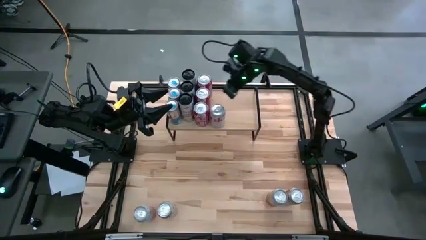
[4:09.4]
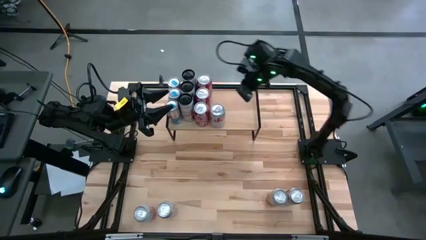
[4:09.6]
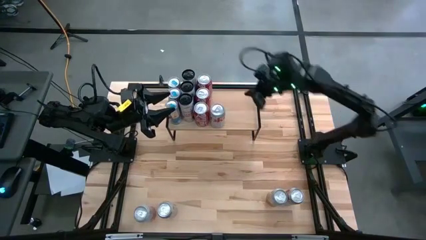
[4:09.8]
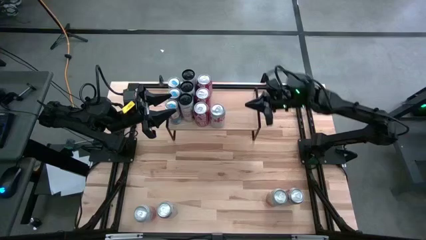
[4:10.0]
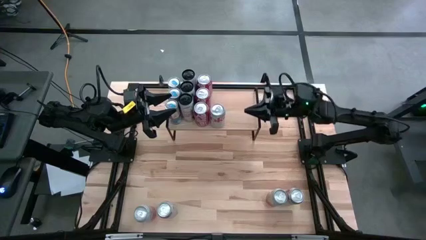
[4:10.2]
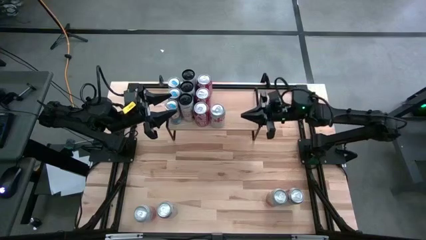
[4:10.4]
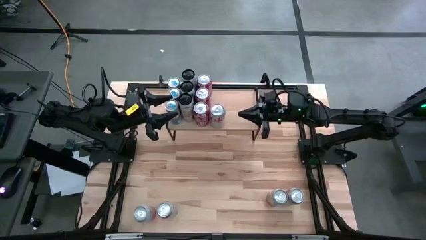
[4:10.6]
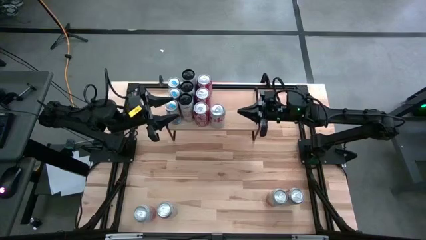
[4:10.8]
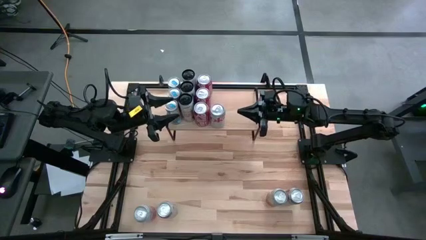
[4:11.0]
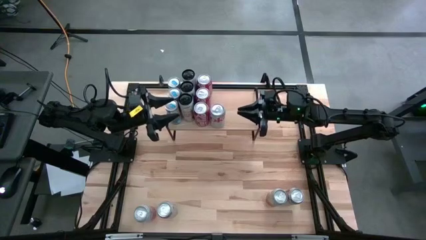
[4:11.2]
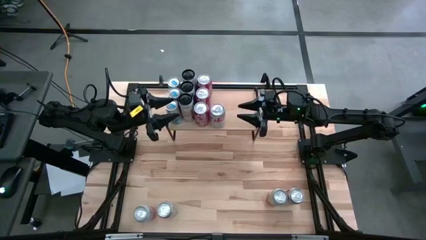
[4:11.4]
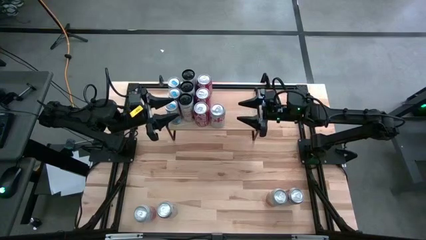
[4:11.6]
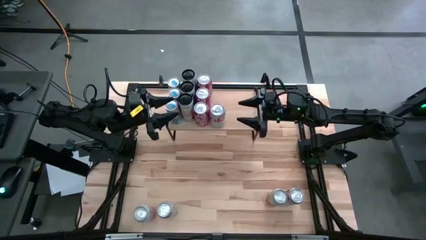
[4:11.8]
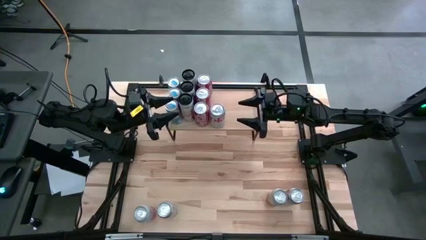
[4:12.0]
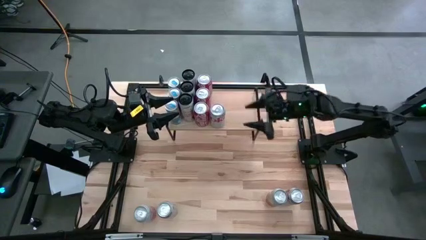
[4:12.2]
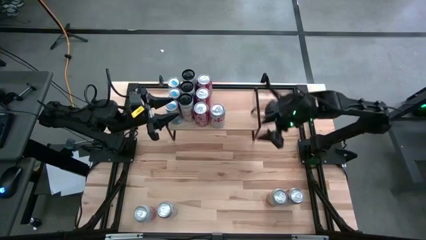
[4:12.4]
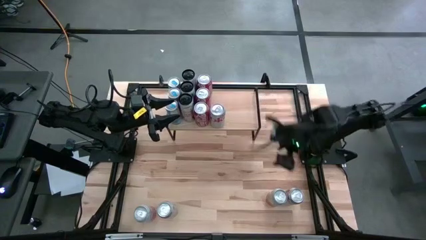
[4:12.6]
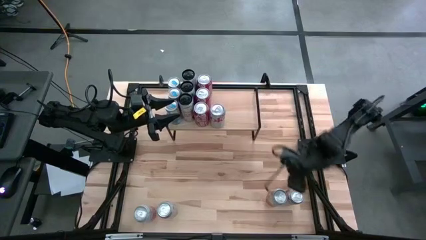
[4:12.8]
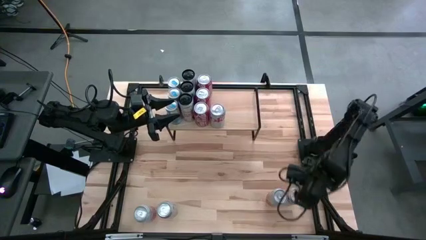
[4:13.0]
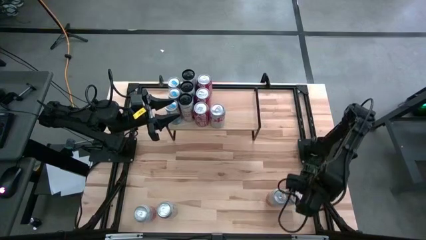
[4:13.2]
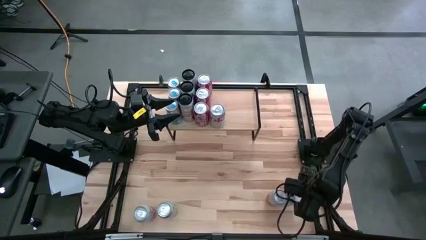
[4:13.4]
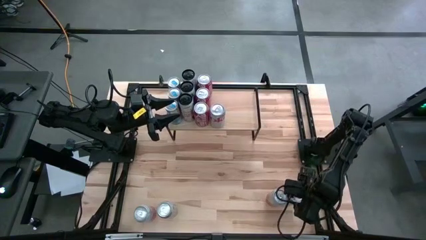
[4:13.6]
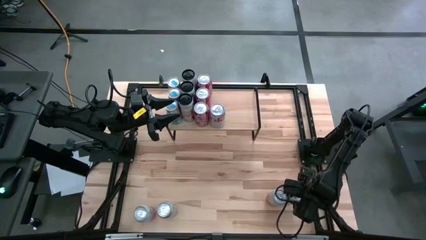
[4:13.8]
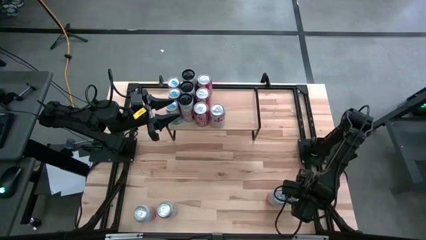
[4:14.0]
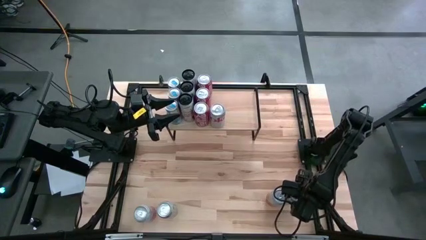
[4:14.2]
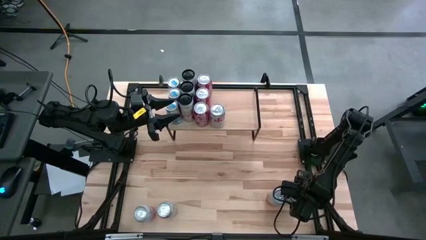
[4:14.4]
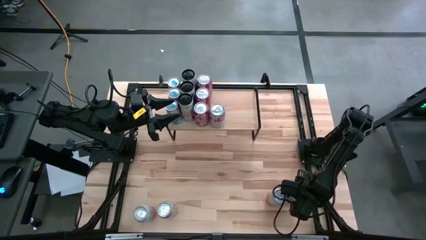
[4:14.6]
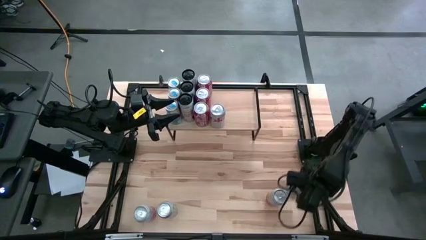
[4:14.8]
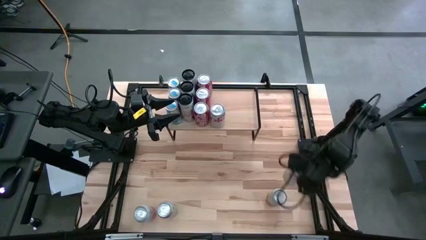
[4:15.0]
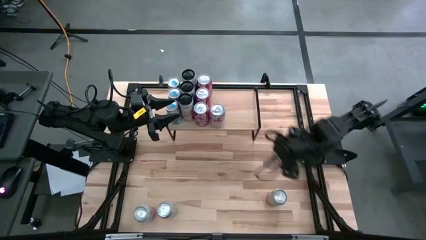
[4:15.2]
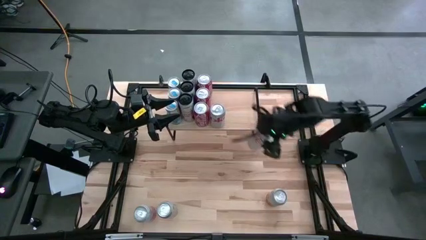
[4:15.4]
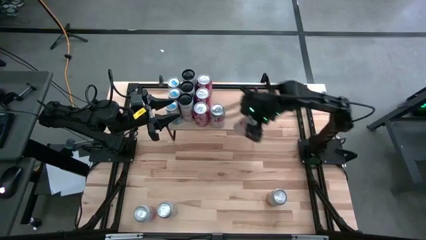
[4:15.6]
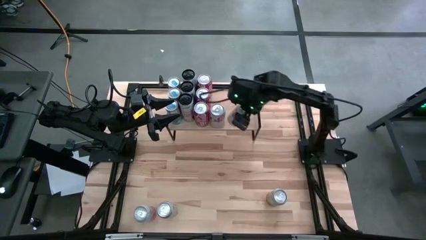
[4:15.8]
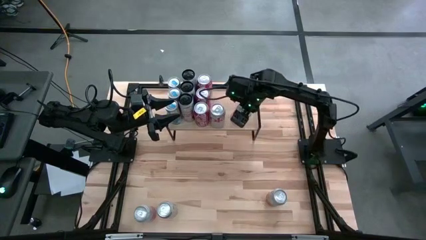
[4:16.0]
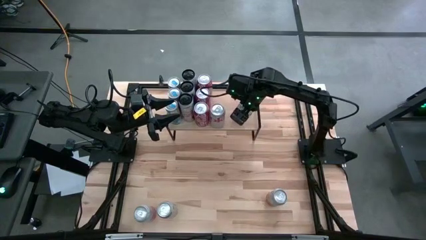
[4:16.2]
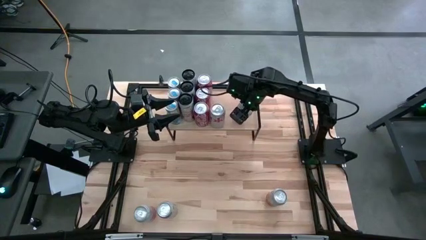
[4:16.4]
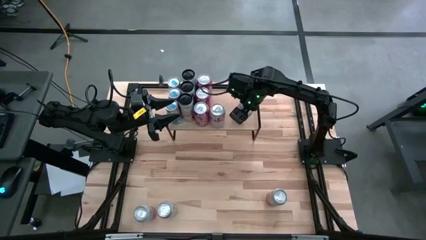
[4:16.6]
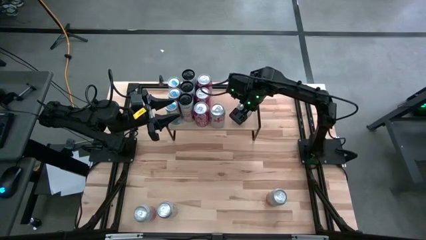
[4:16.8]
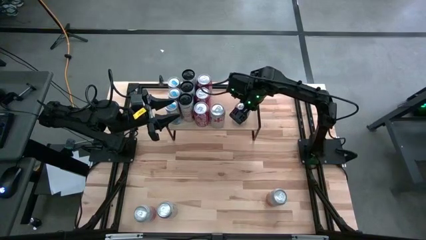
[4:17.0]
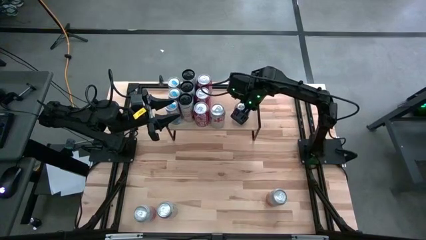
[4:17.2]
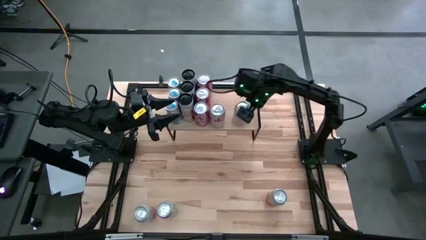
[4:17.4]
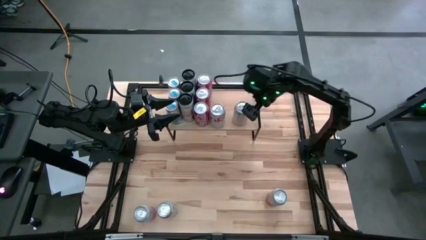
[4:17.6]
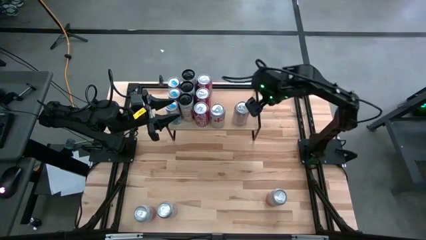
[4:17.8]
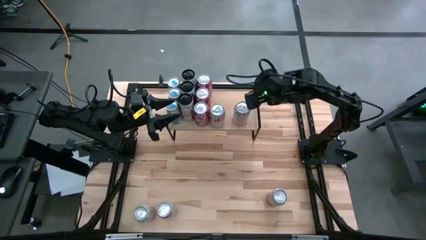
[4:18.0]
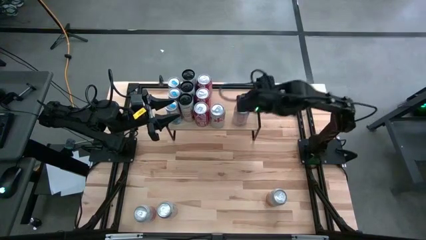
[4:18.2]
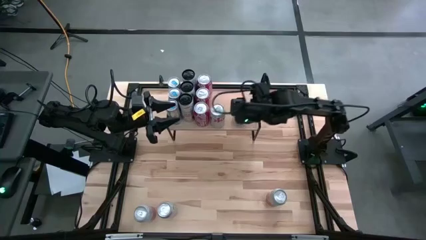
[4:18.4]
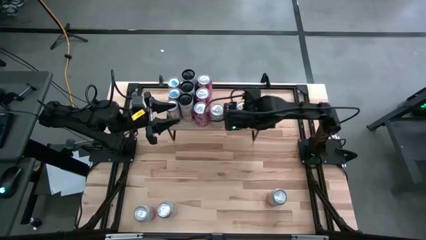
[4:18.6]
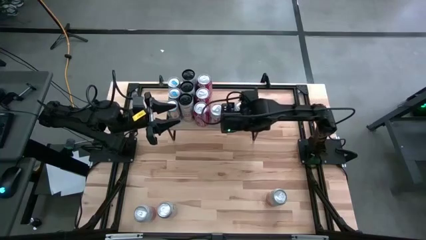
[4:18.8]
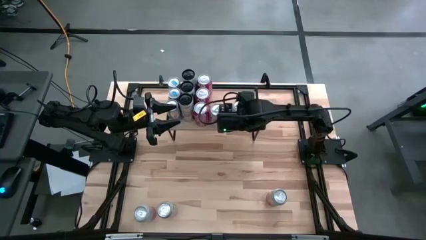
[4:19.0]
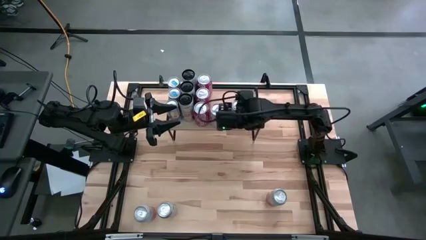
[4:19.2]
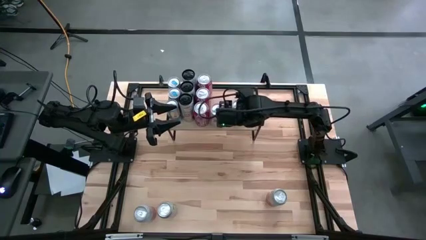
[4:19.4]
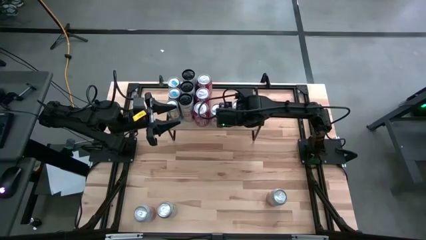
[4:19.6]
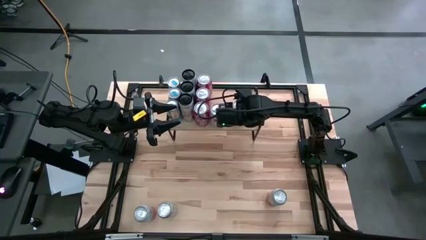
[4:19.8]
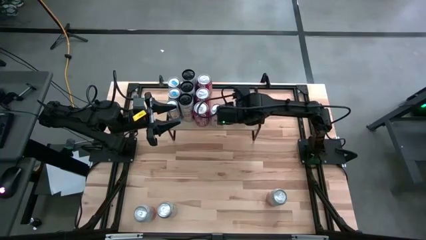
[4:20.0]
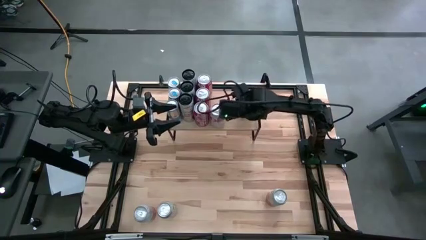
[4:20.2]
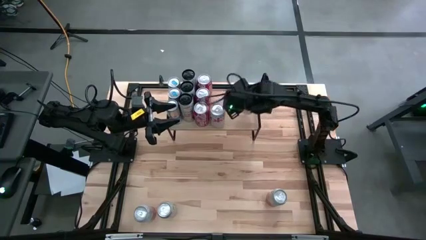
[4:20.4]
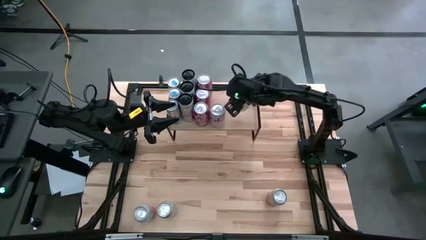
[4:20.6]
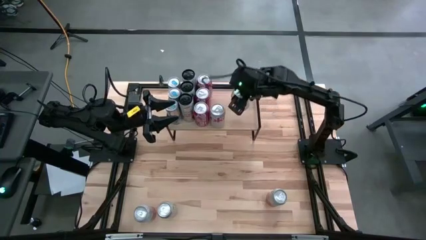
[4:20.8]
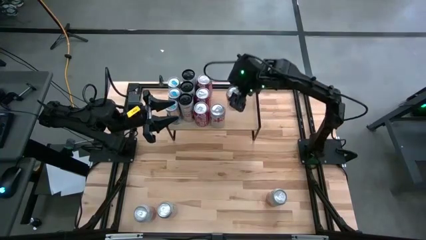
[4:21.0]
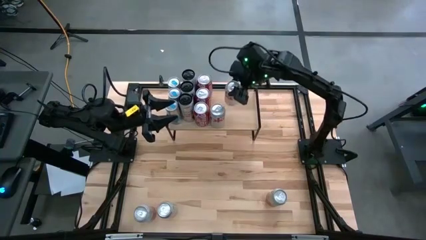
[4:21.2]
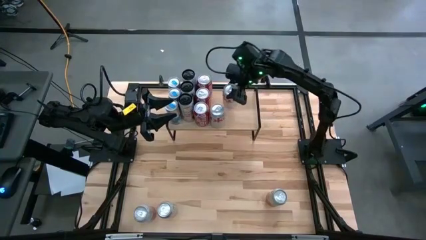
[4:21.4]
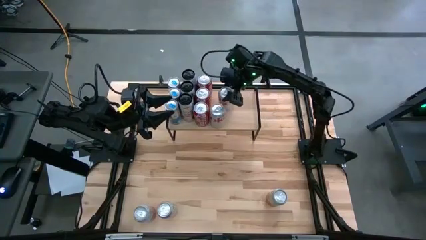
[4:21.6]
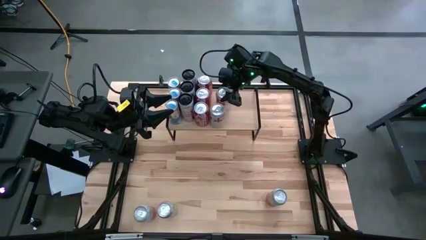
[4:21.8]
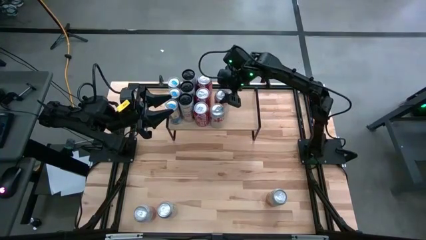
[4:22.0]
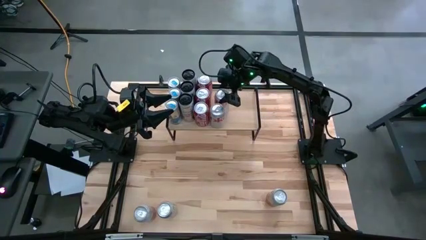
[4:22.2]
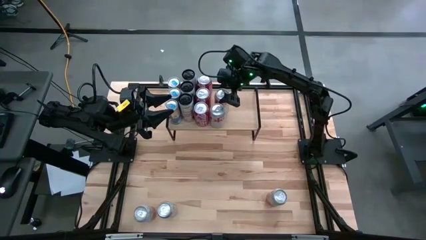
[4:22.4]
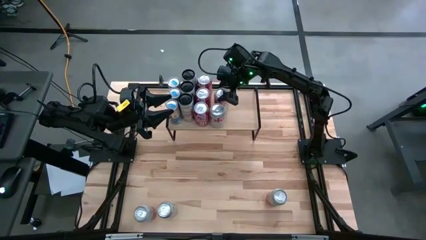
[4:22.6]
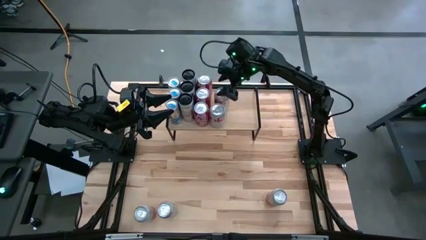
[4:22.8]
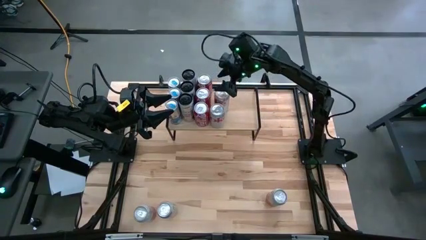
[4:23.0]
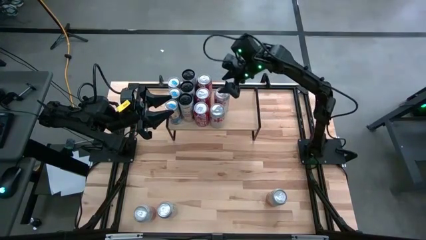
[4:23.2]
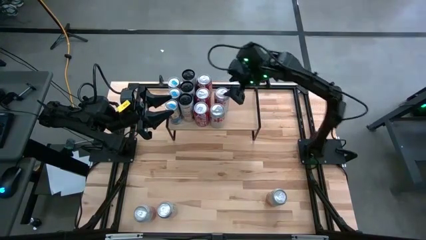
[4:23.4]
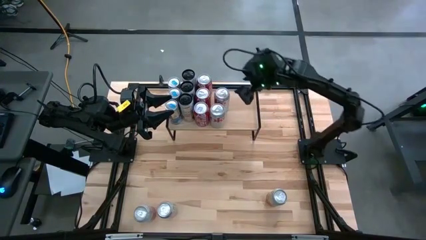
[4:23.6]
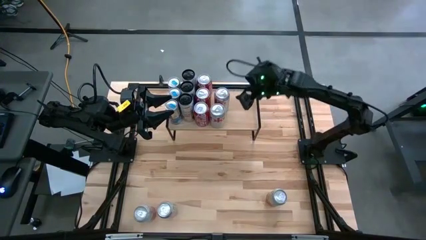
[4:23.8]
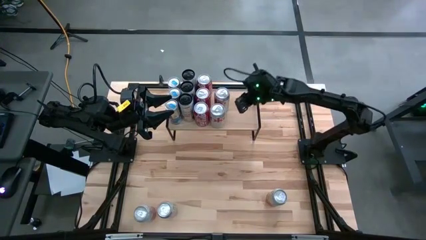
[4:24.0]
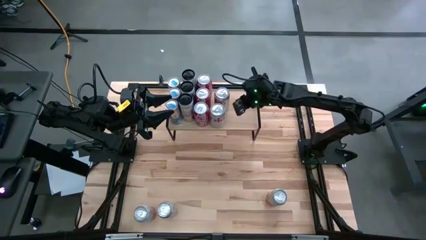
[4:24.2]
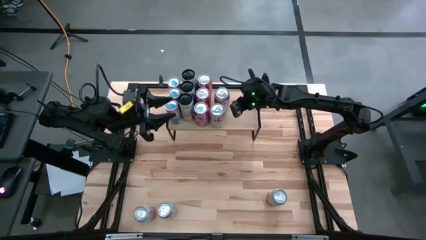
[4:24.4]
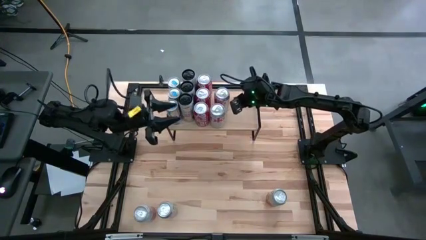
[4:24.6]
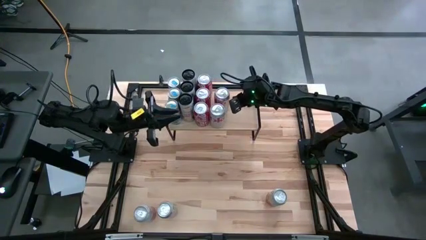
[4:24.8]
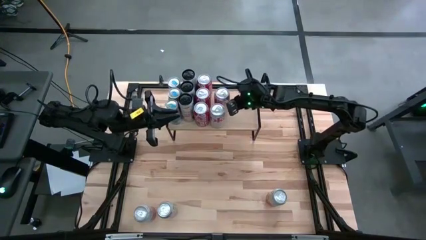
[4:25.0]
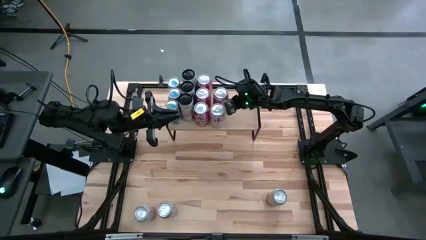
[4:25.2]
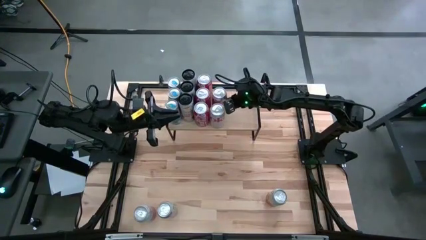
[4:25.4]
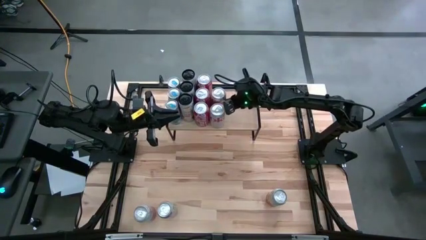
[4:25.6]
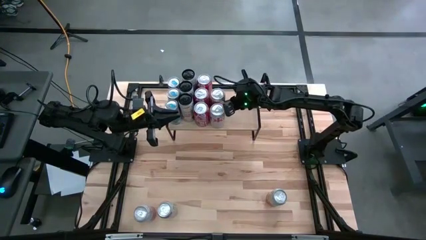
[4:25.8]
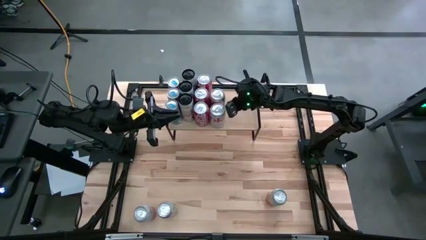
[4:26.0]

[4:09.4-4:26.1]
Task: Place canned beverage on shelf
Put the right red-silver soda can aligned with the other red-silver soda can on the shelf
